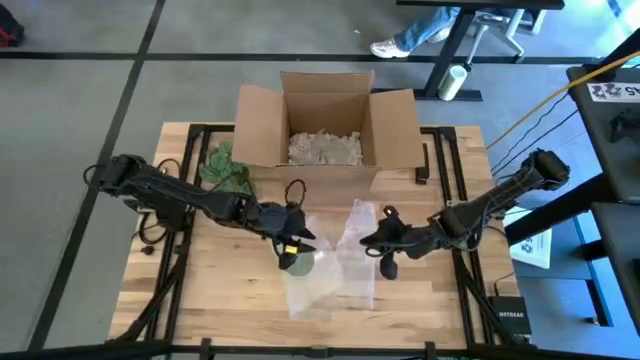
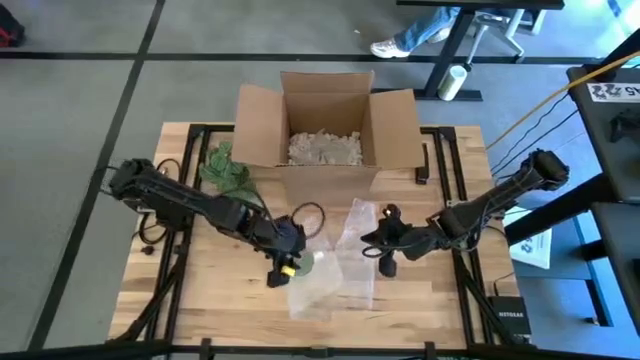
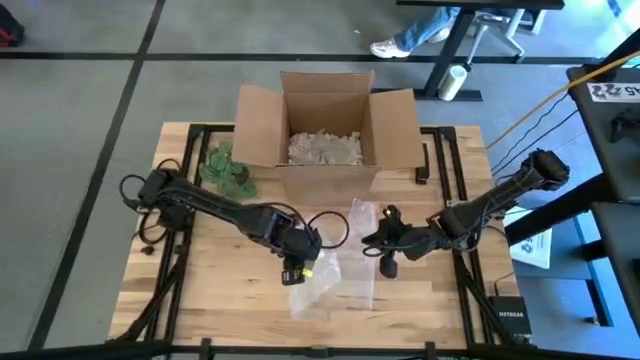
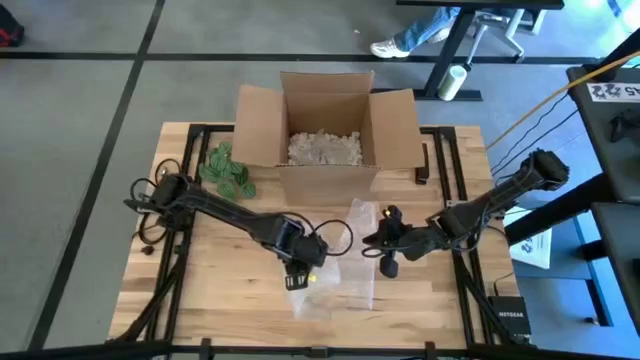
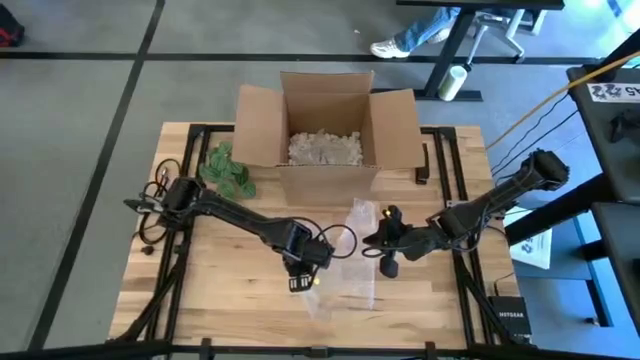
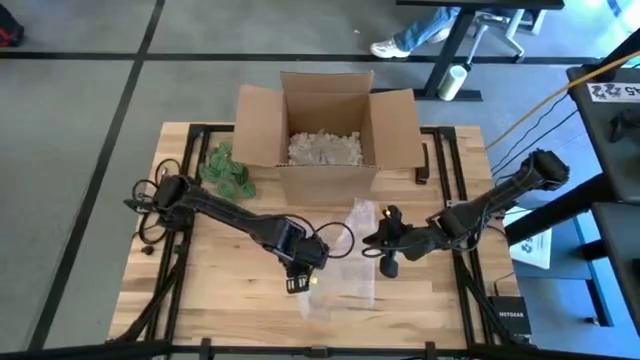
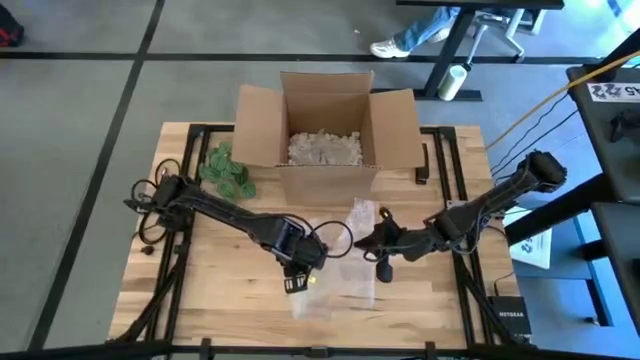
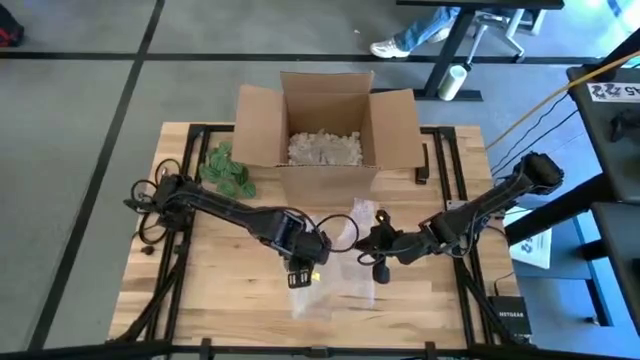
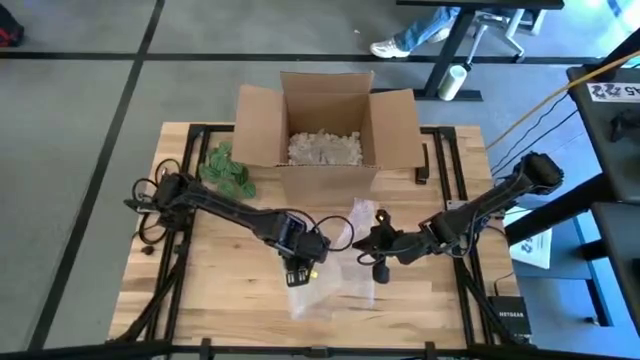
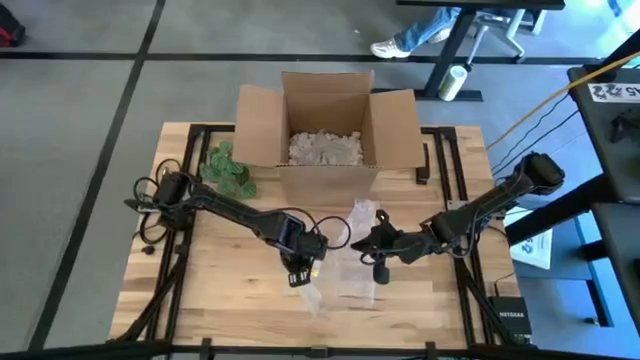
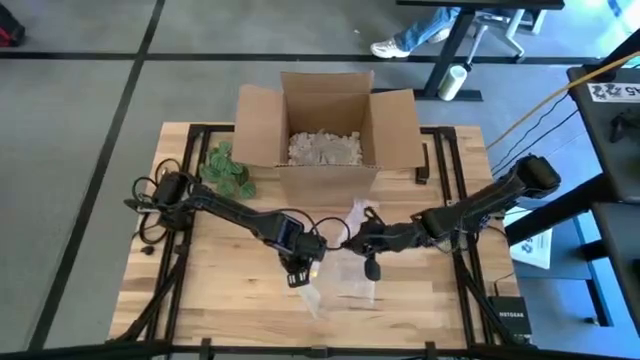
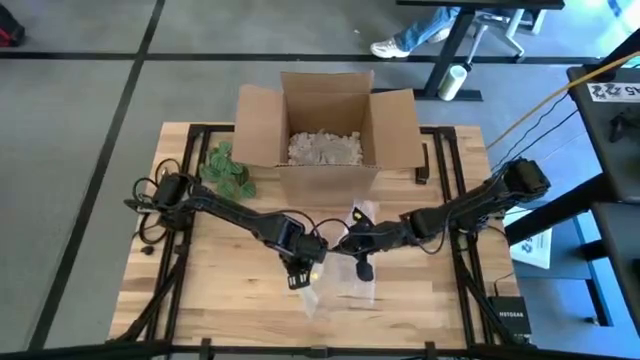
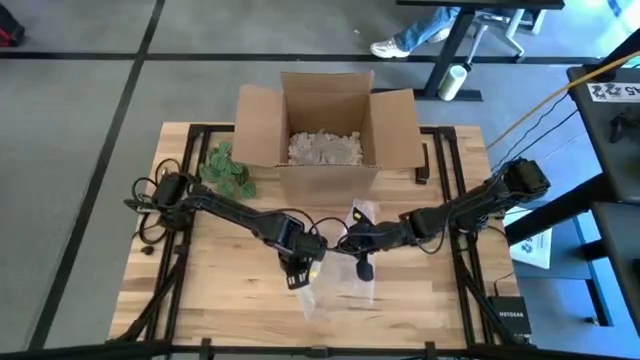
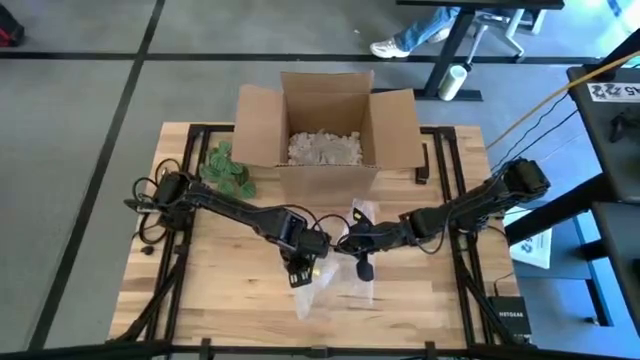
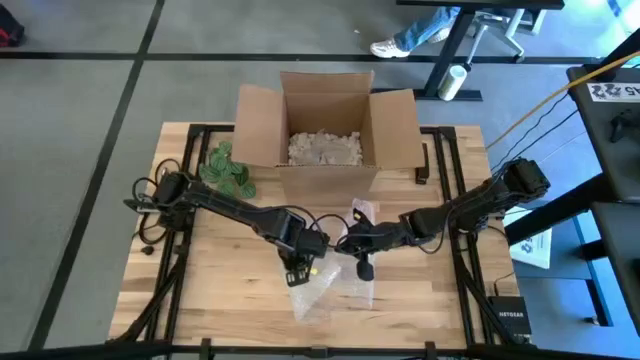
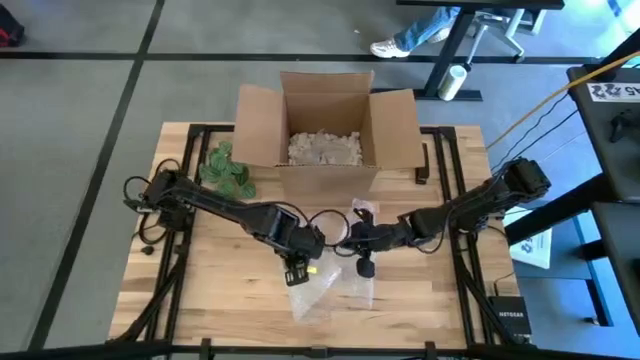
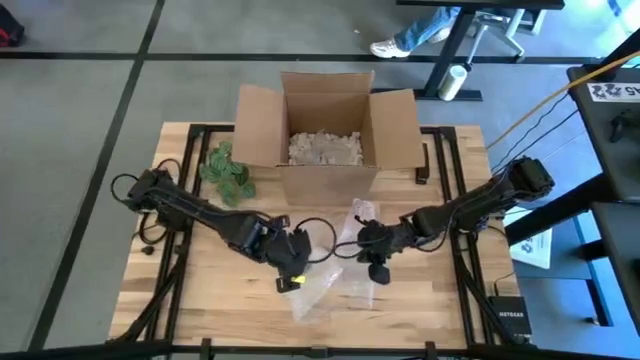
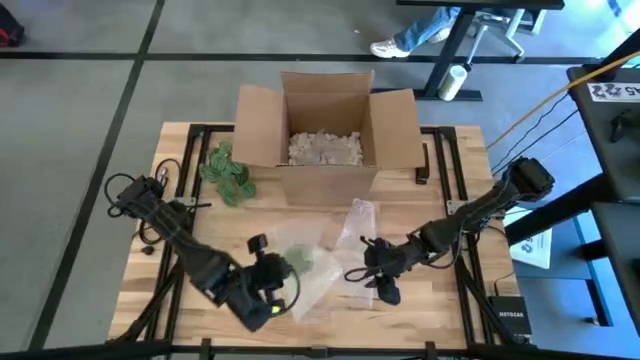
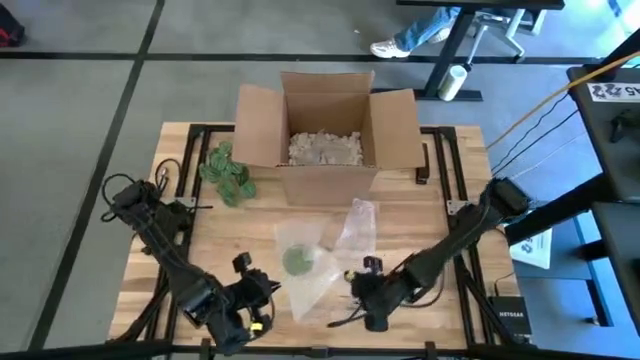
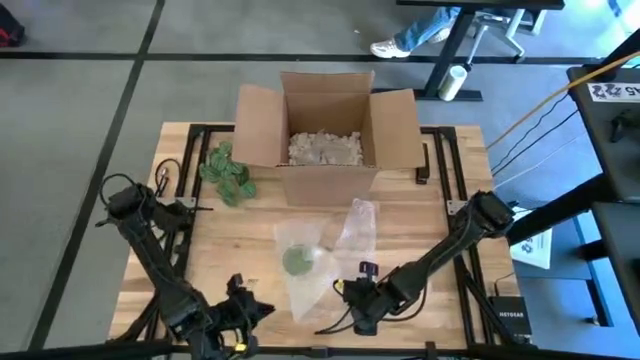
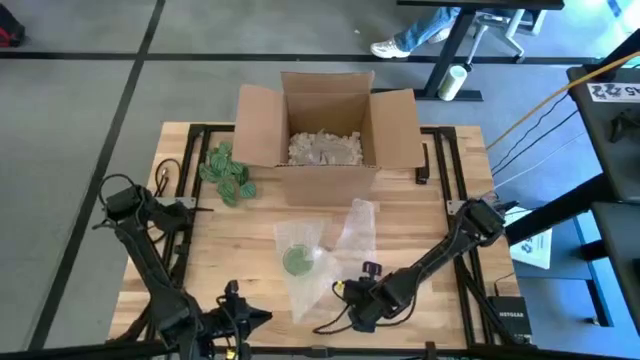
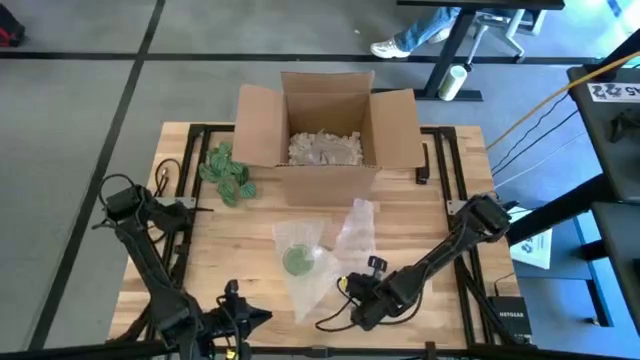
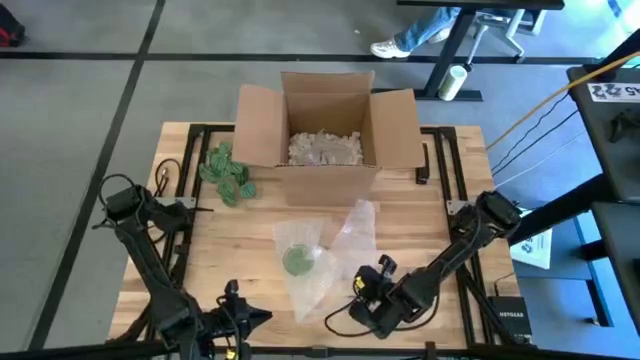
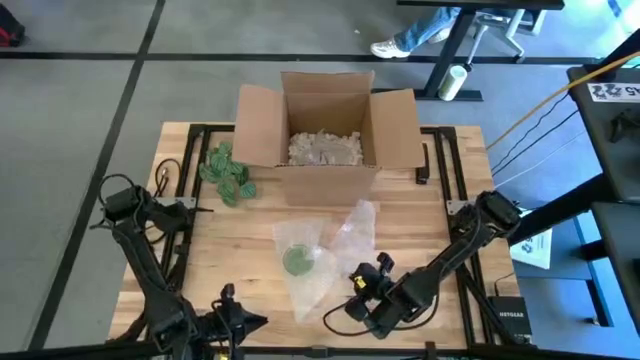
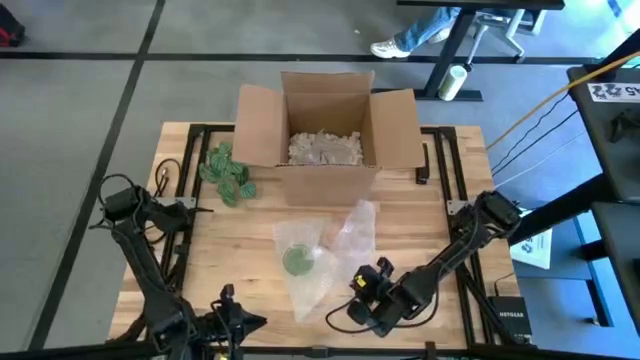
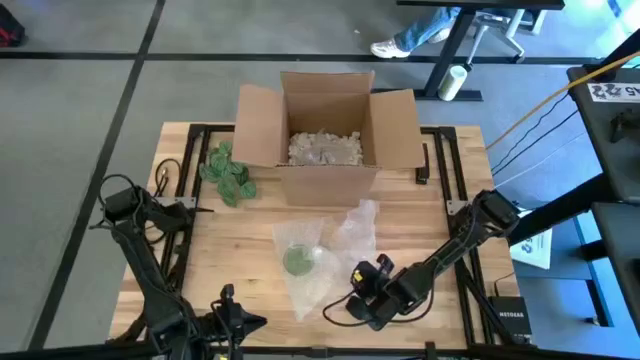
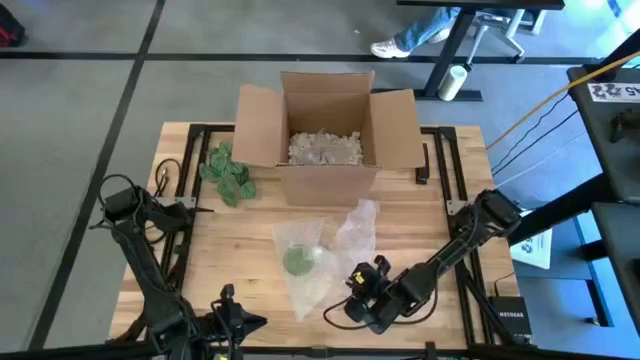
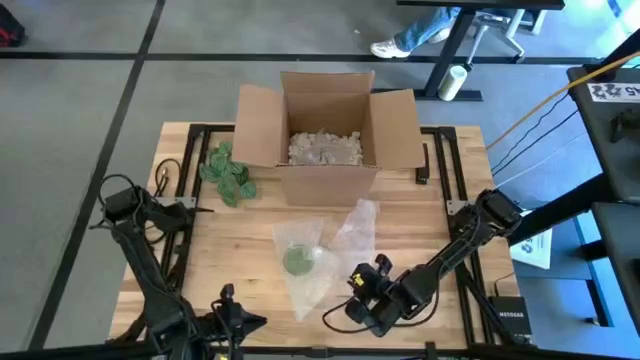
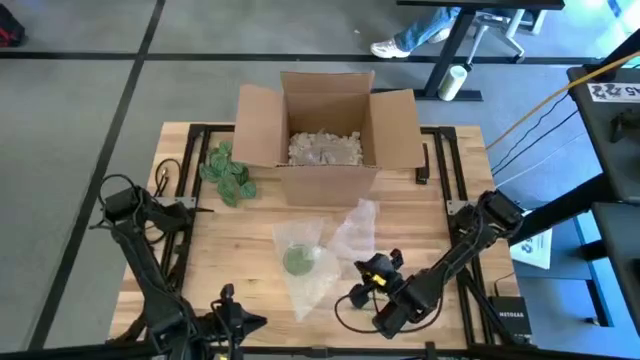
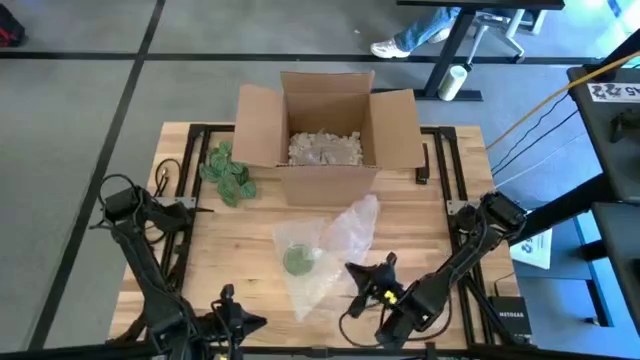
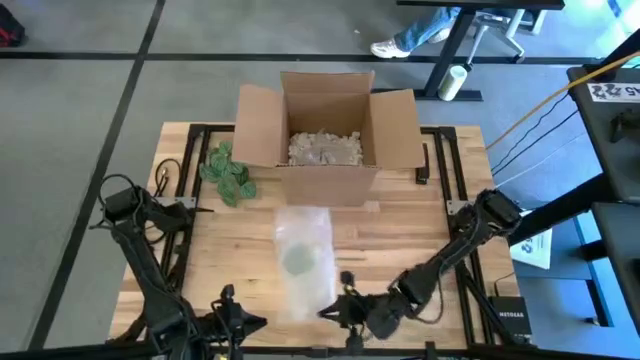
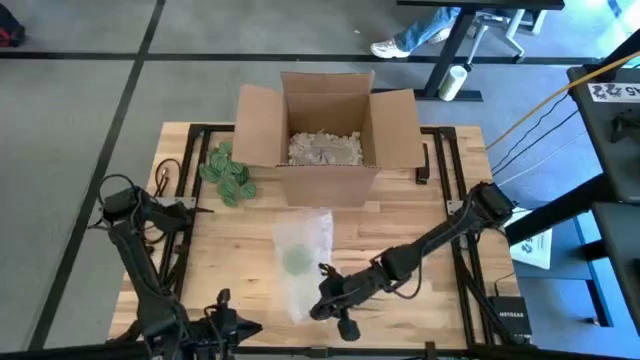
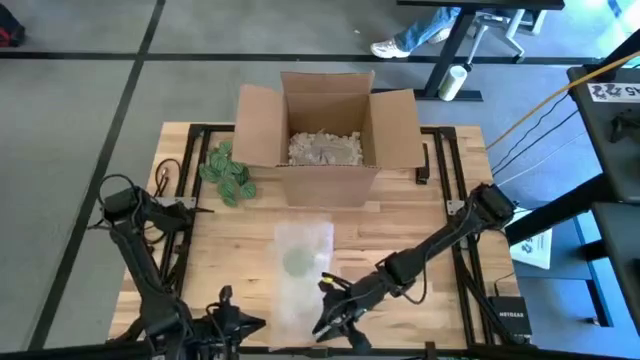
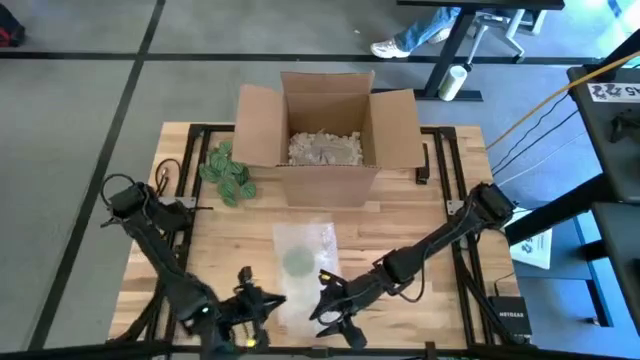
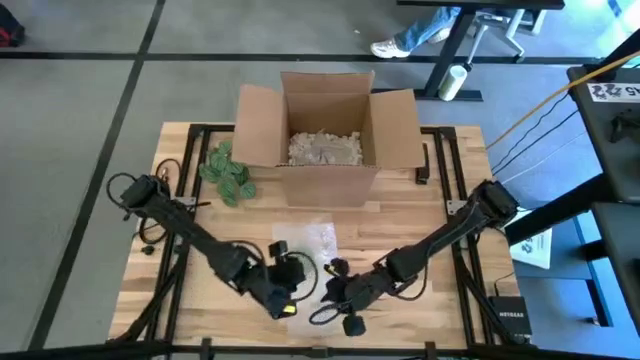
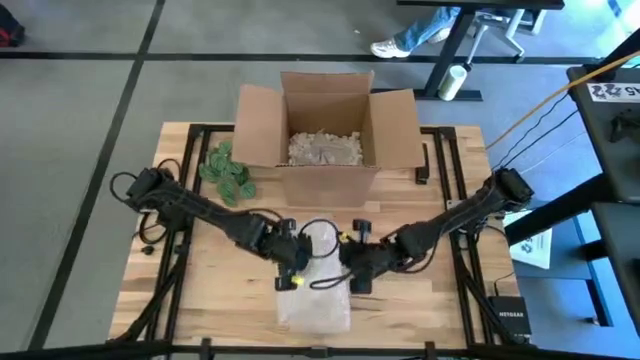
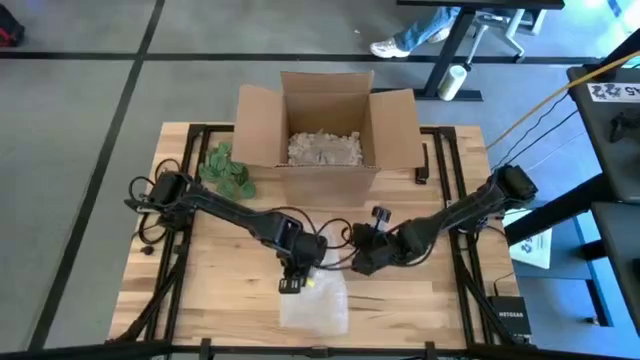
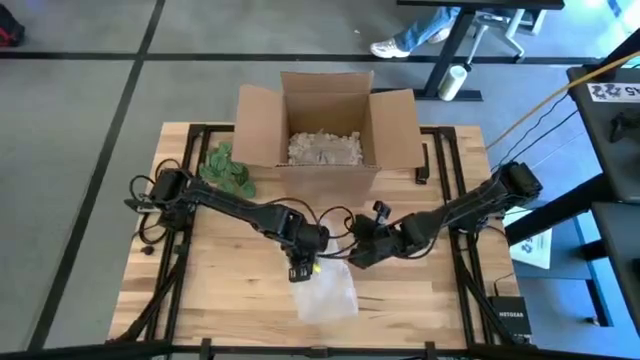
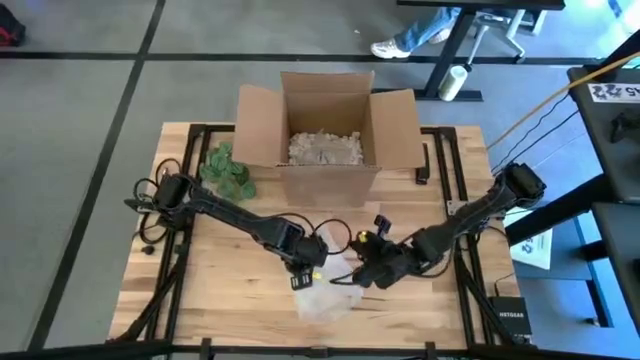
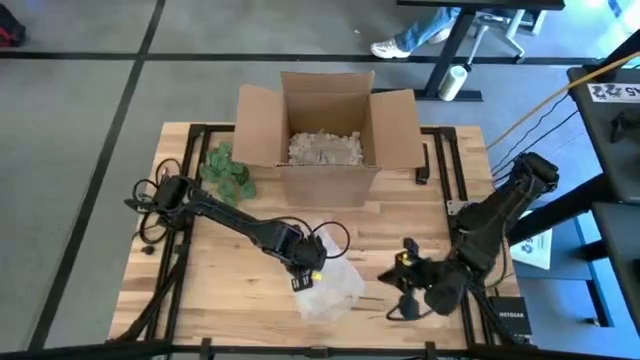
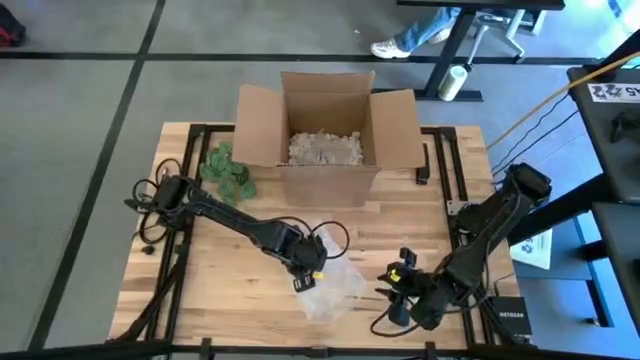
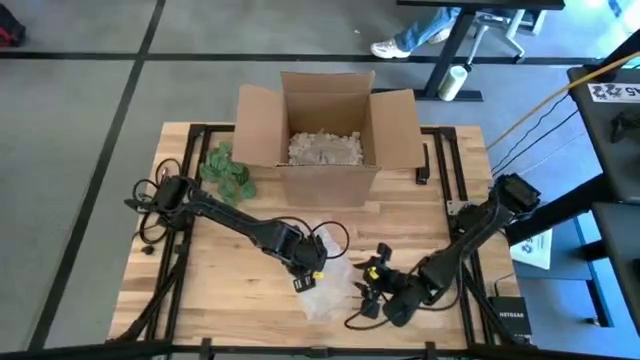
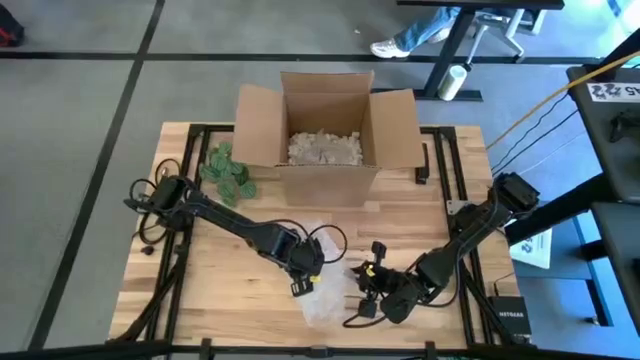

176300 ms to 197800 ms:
Task: wrap mug
Wrap the green mug in bubble wrap
